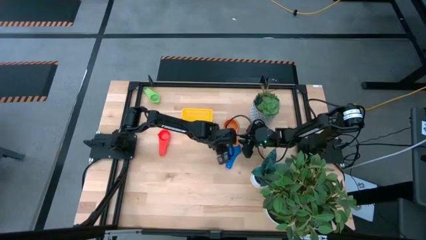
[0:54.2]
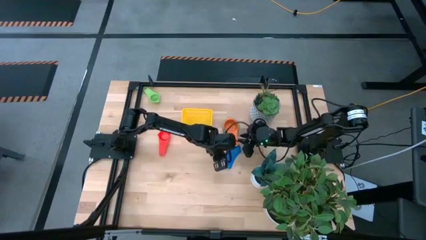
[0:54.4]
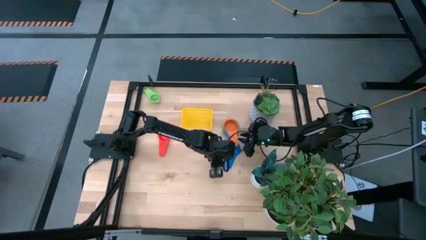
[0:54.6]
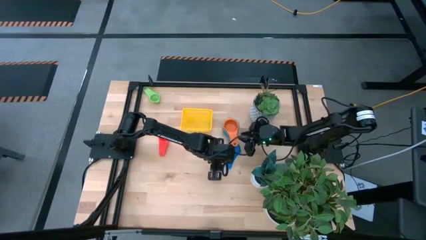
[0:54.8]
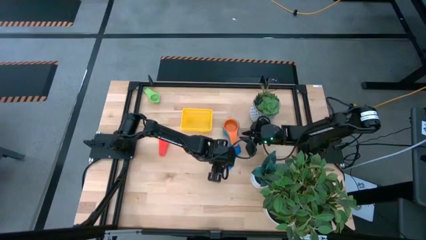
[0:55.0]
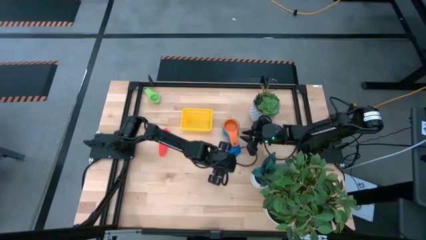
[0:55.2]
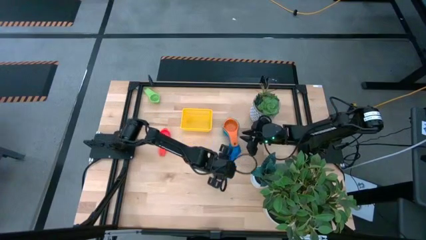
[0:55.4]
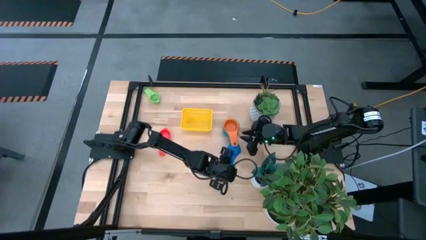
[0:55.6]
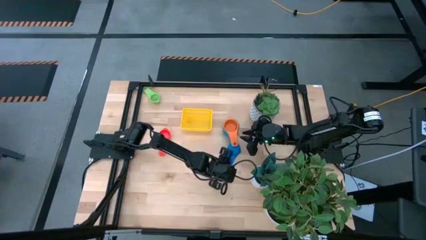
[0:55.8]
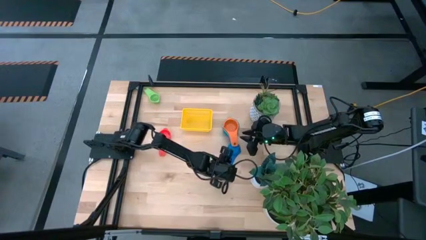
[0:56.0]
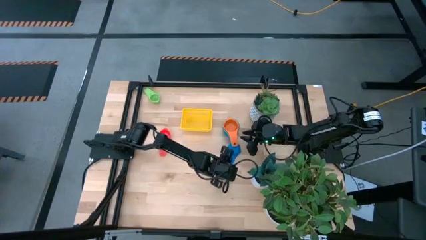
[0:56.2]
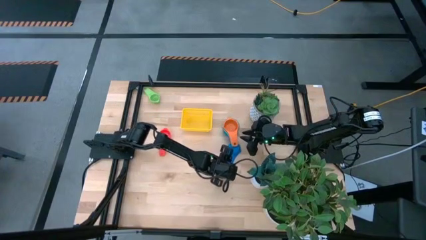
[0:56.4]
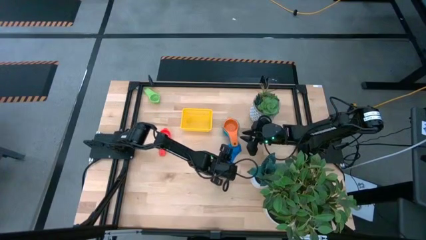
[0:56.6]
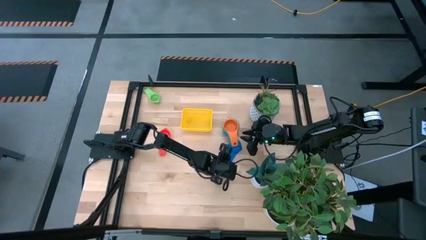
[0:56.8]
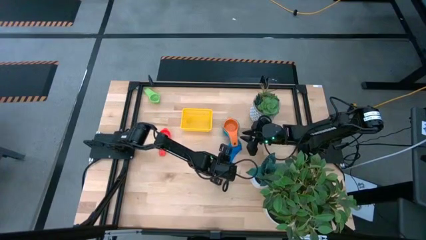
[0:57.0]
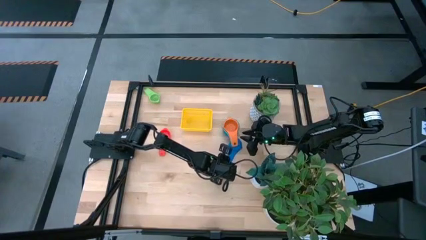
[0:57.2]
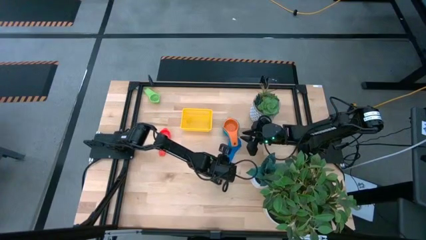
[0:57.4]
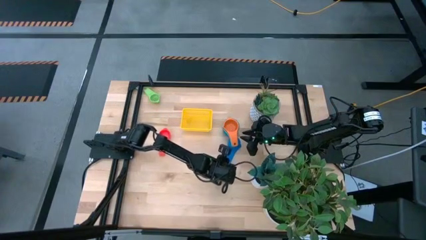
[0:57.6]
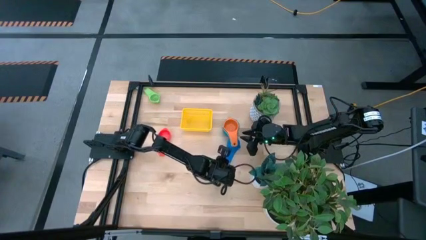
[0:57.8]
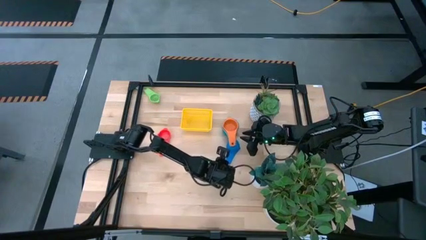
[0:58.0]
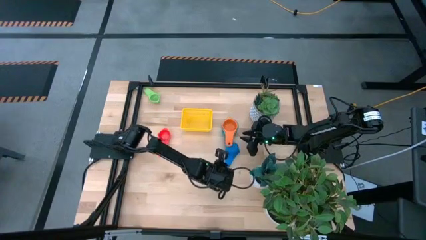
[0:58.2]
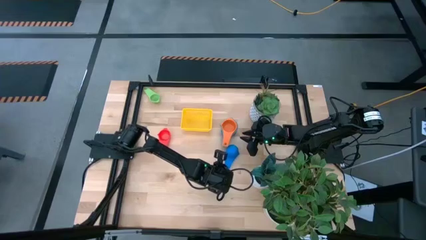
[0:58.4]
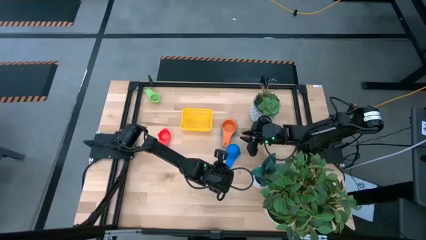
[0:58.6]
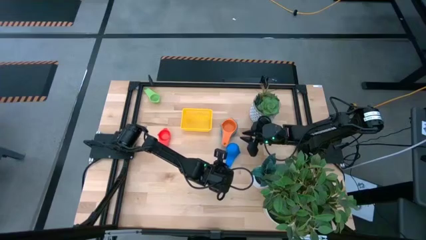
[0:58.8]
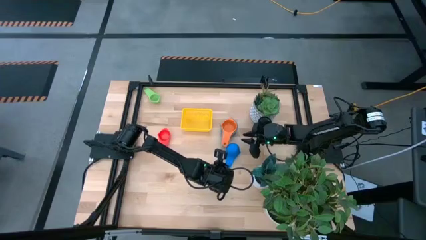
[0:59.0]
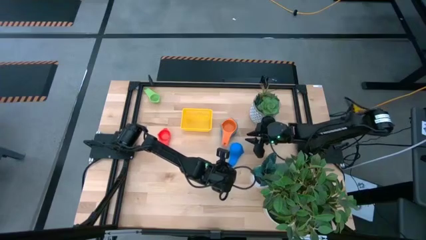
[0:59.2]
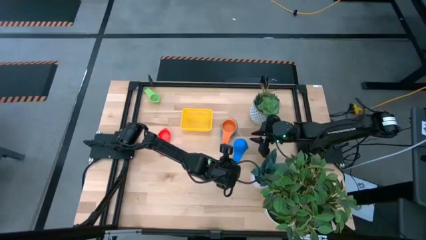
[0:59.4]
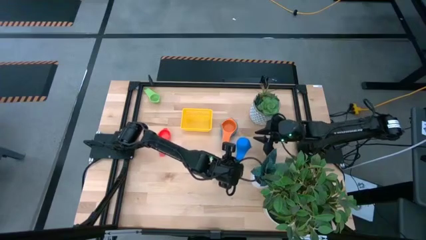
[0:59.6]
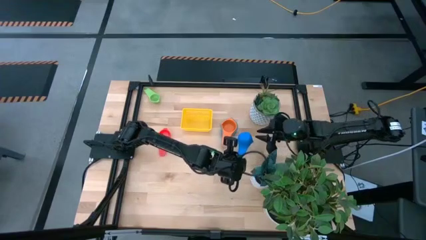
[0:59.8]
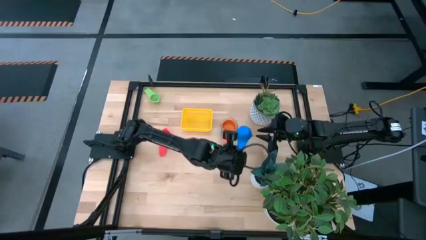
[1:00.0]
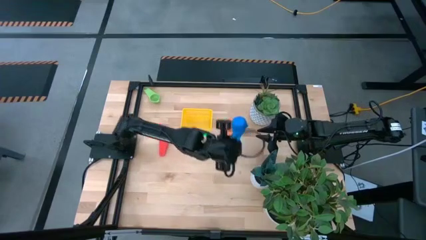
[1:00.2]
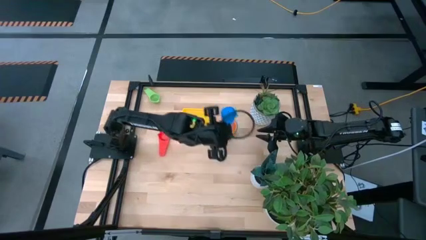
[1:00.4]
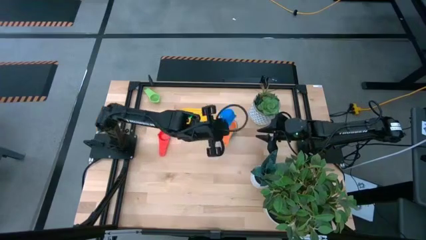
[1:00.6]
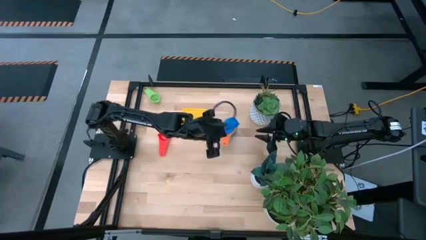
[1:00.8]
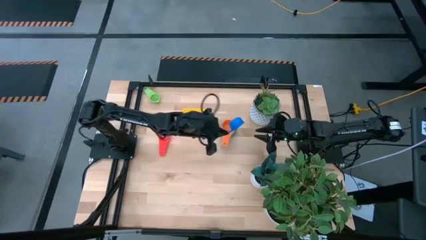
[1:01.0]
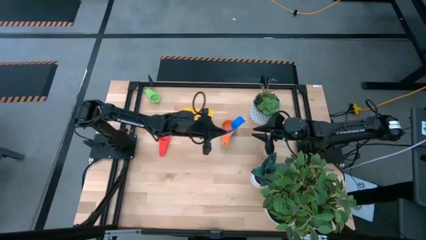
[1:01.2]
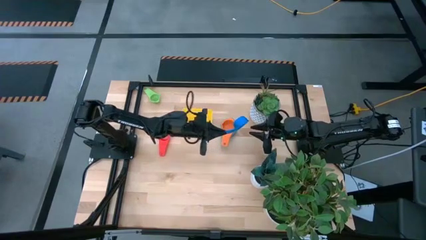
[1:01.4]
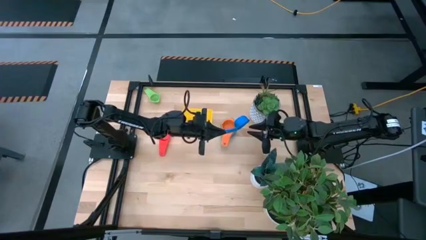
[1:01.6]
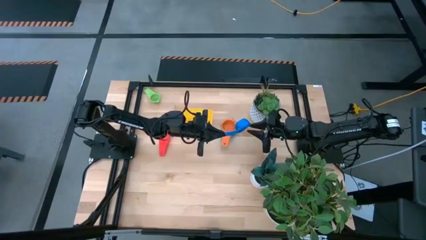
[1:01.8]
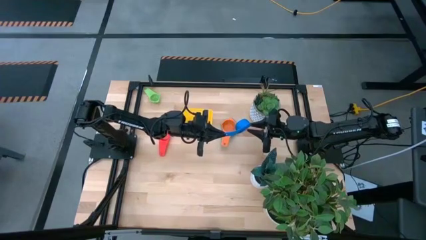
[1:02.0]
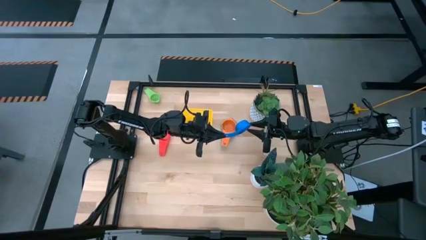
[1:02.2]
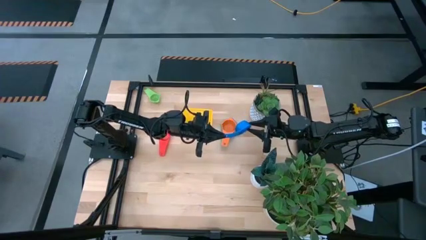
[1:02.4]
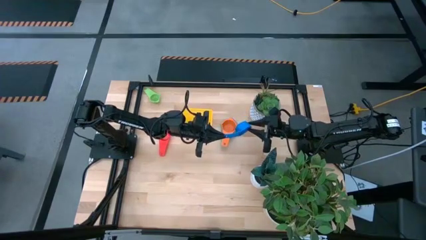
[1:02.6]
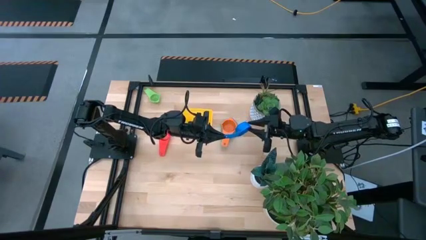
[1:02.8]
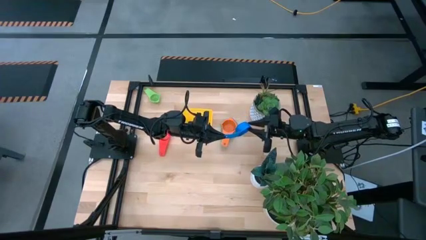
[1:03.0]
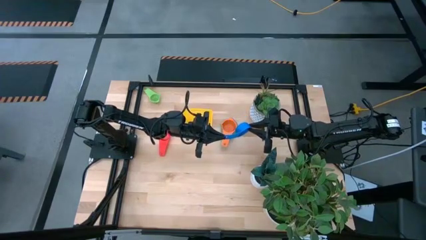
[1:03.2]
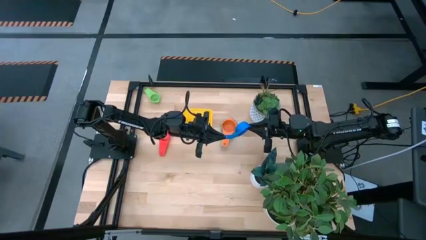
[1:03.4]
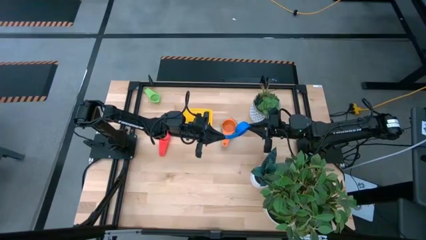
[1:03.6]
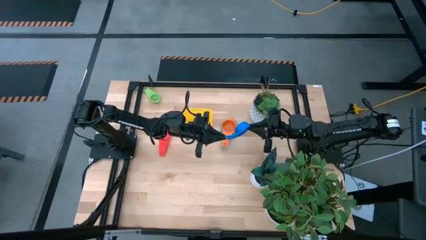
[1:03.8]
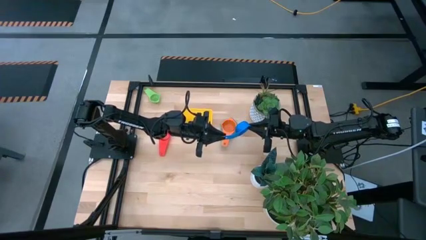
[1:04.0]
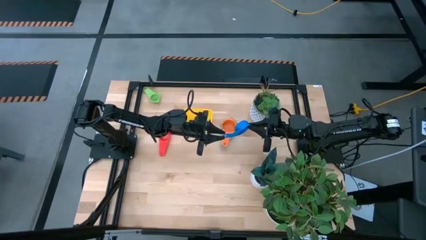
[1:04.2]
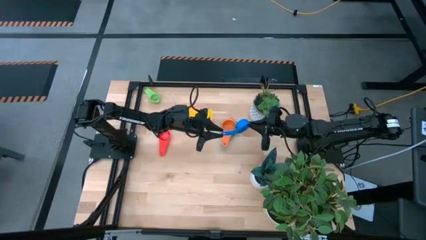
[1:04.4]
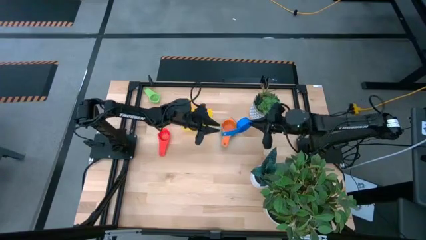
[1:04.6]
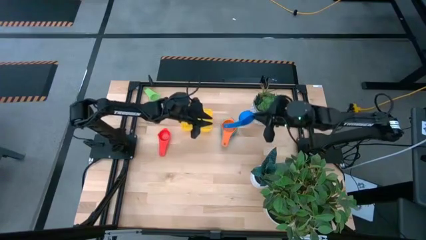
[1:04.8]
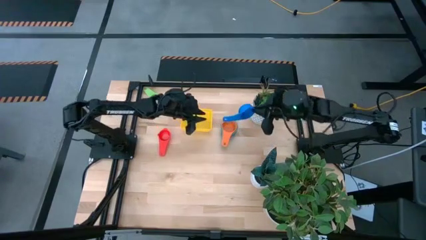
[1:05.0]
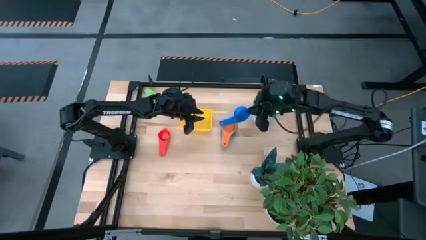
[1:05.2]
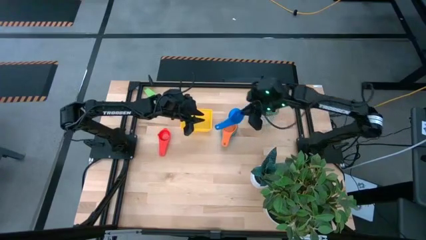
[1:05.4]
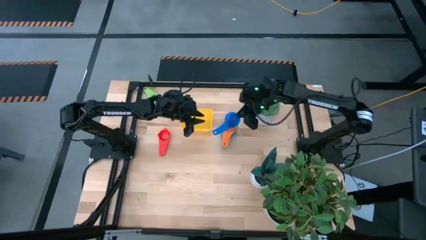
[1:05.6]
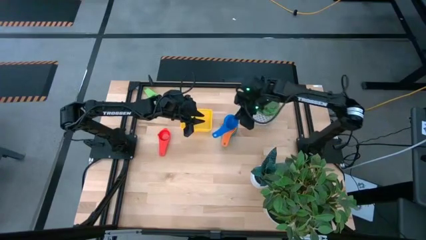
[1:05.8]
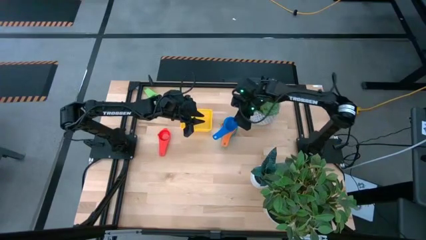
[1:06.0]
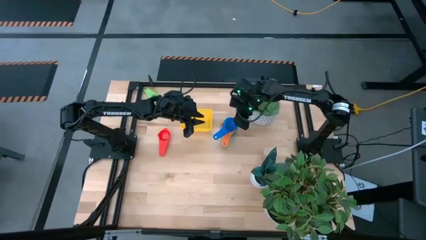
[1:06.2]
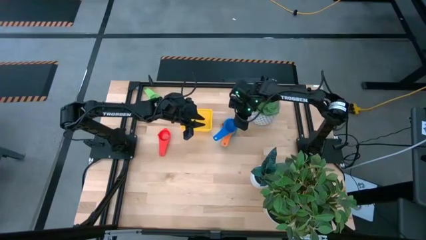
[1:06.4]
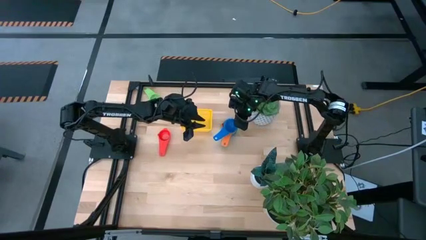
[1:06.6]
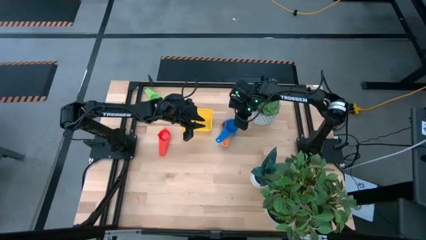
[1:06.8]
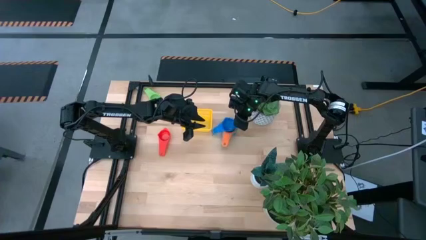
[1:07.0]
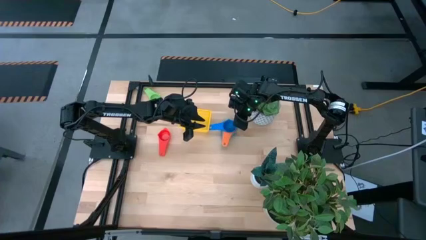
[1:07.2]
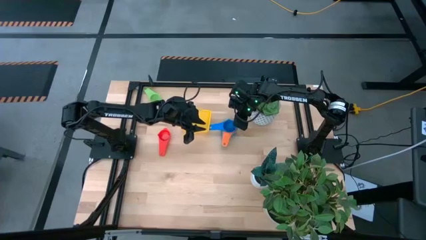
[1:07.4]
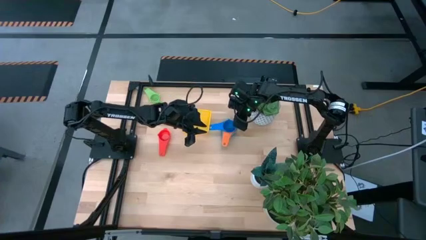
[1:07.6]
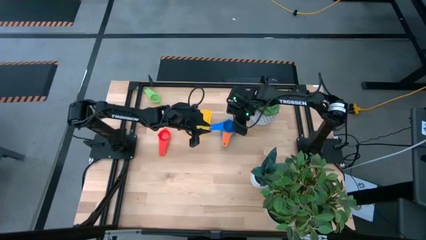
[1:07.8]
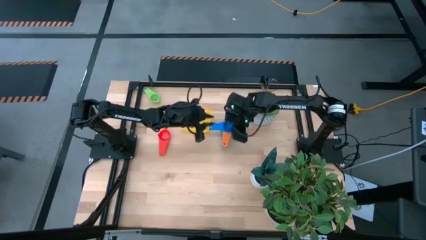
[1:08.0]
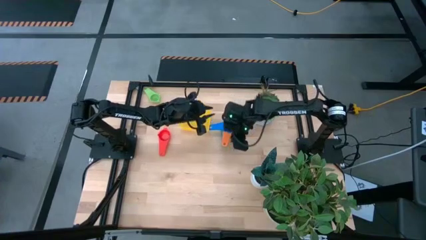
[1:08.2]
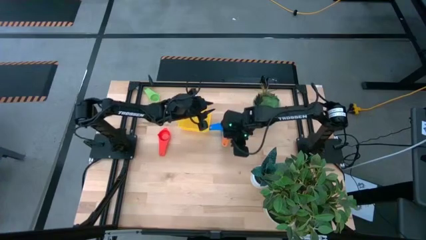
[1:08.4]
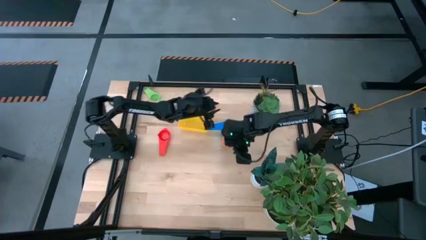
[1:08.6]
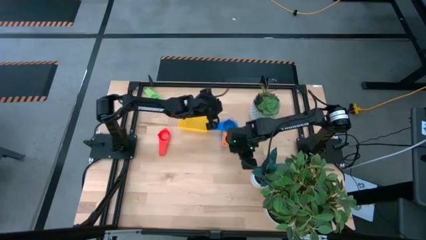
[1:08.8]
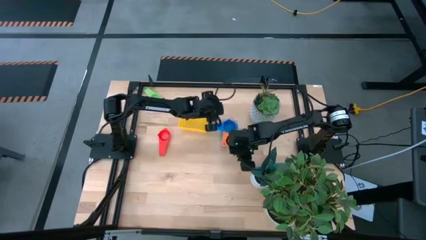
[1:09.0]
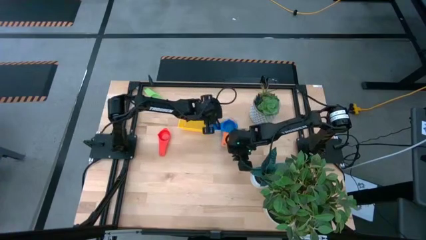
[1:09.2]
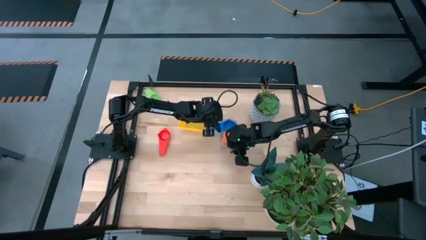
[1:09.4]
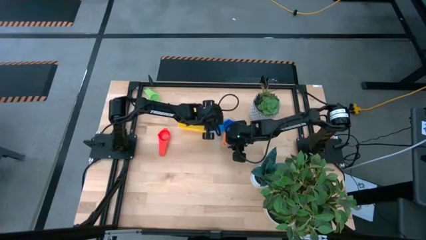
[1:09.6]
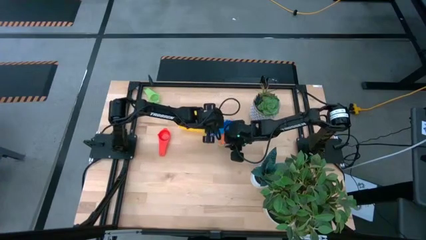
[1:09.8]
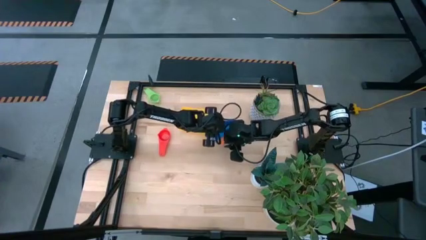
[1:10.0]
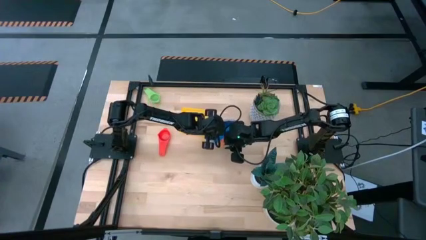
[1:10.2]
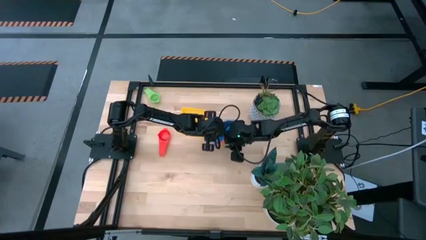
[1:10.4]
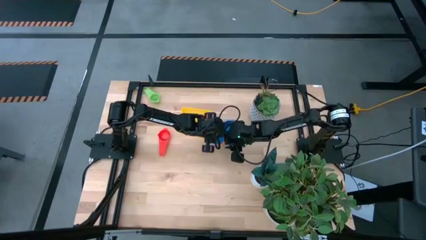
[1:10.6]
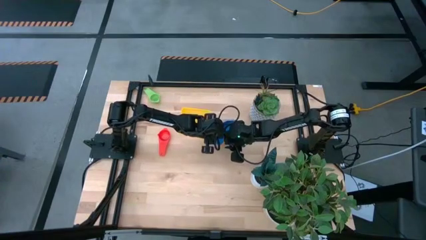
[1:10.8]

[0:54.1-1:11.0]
Task: Nest measuring cups in basket
Stack the blue measuring cup into the orange measuring cup
